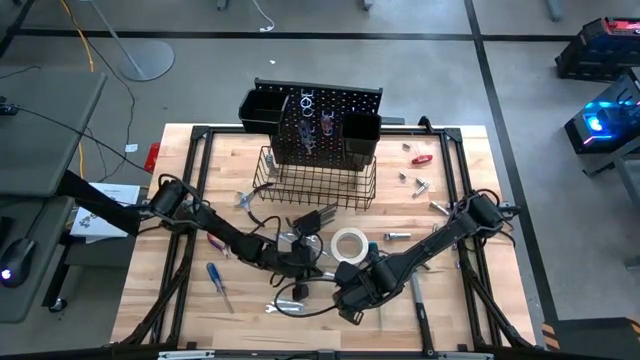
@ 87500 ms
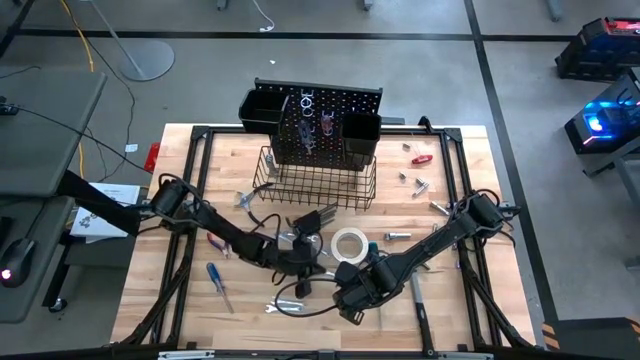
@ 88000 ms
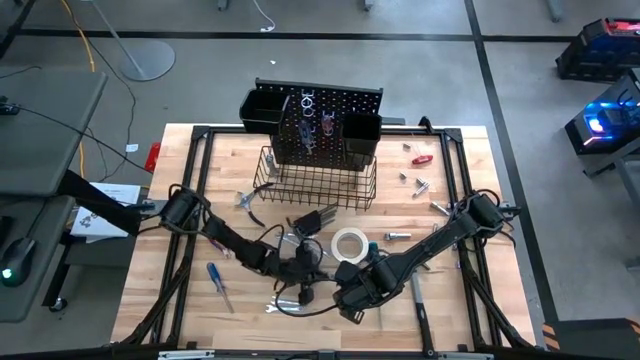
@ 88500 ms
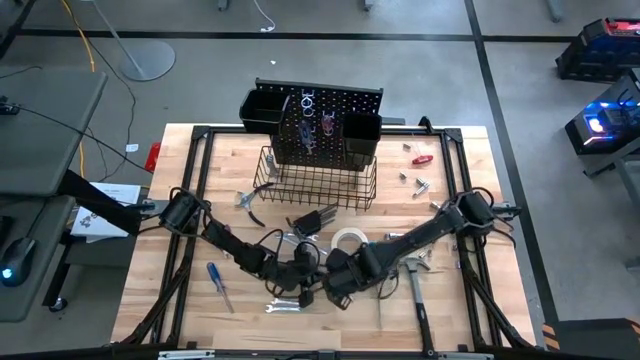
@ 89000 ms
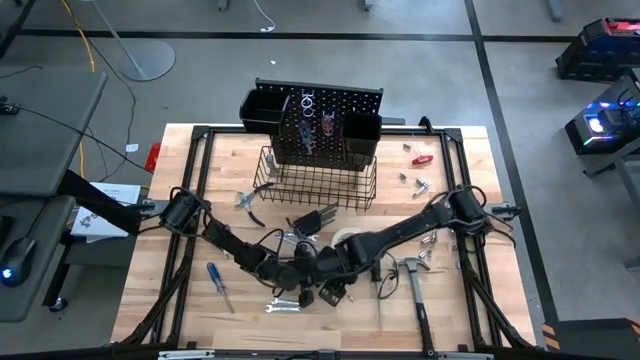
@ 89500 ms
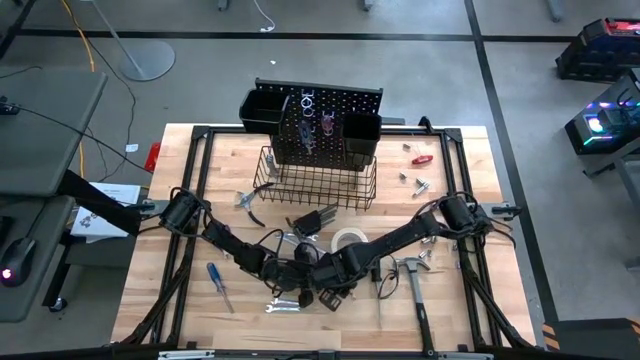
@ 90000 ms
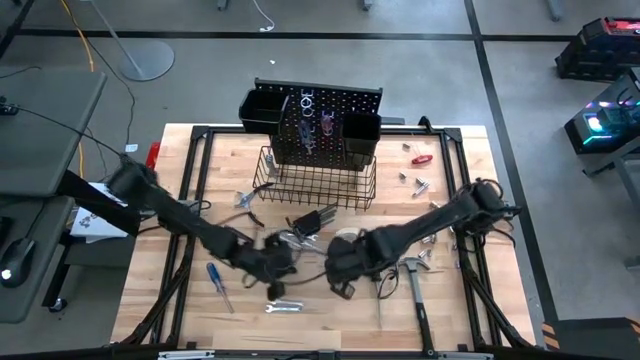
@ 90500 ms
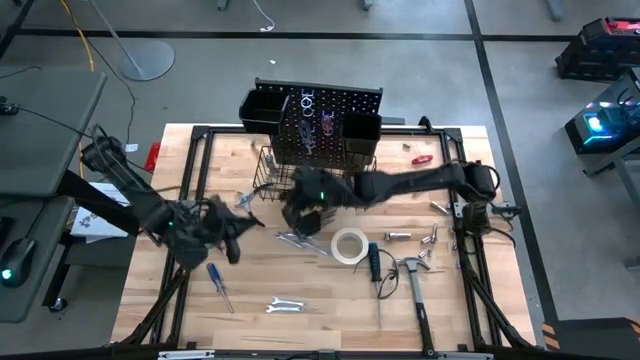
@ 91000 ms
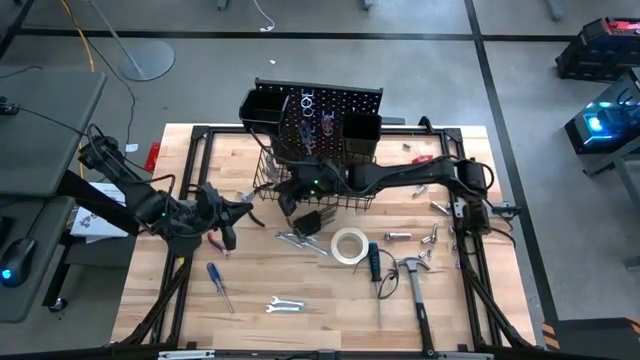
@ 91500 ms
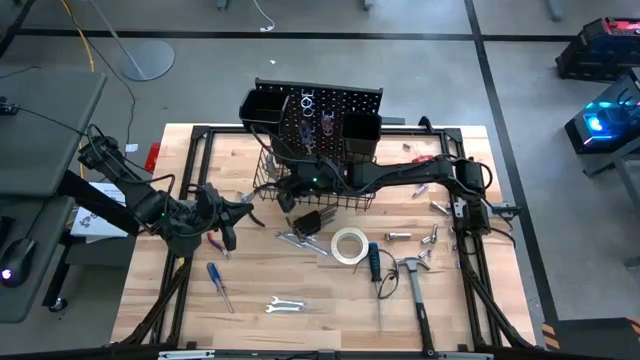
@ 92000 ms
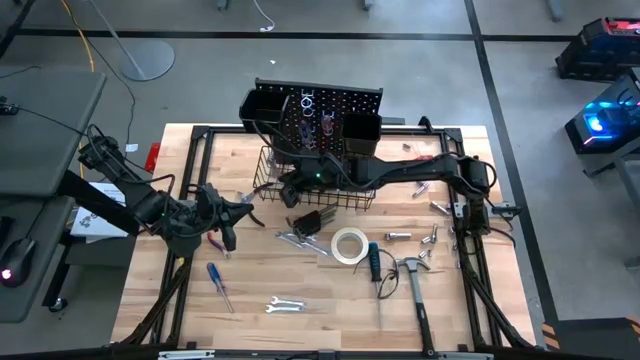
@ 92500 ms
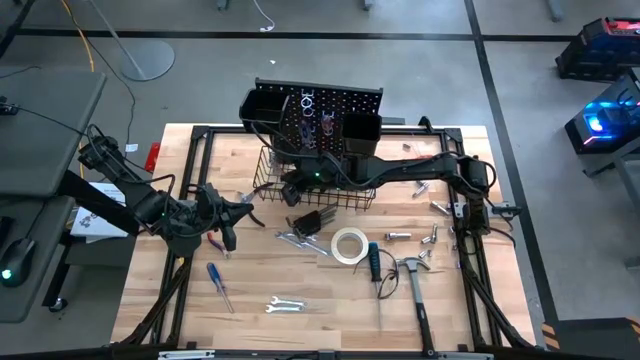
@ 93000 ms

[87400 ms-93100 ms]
Task: Hang tools onto peg board
Hang the wrench on the peg board

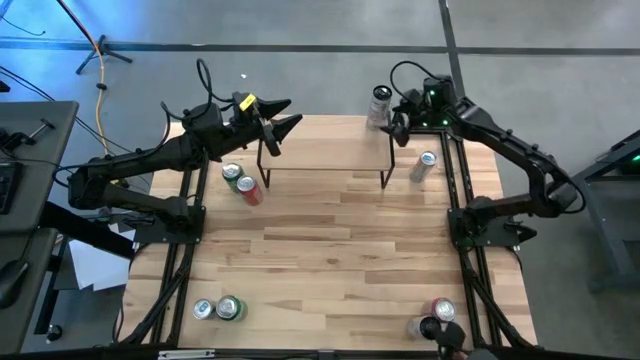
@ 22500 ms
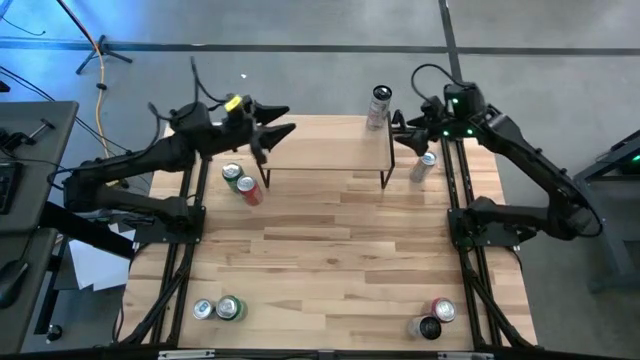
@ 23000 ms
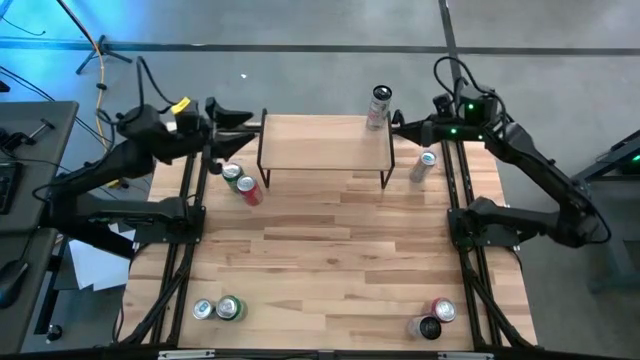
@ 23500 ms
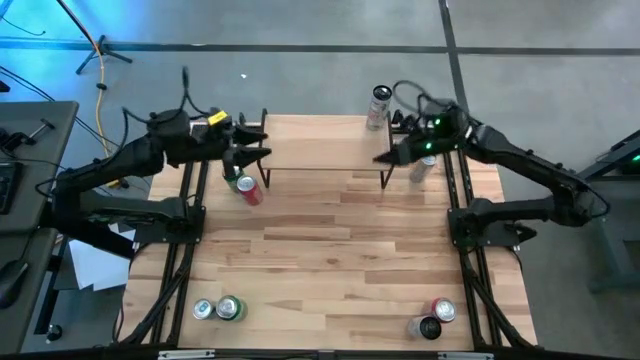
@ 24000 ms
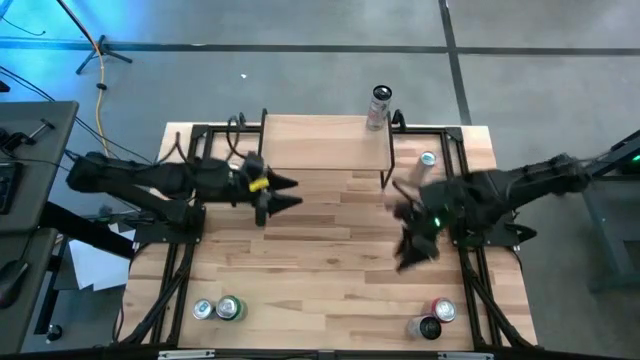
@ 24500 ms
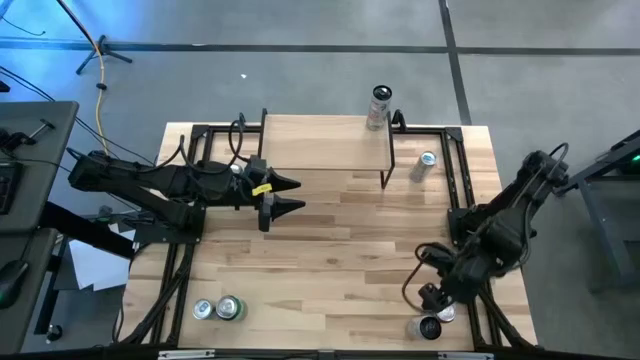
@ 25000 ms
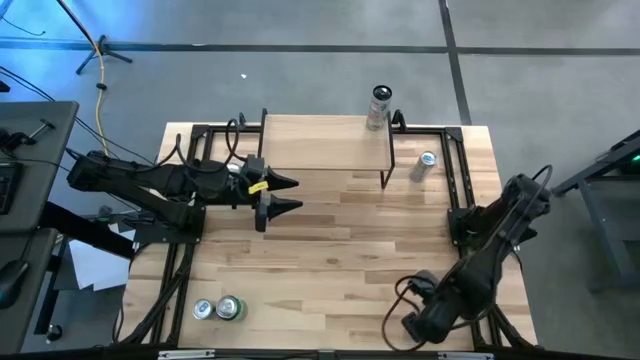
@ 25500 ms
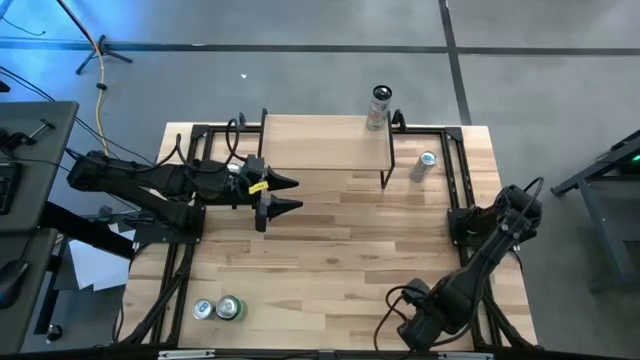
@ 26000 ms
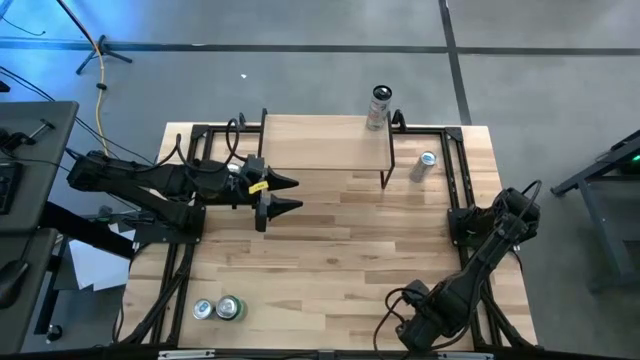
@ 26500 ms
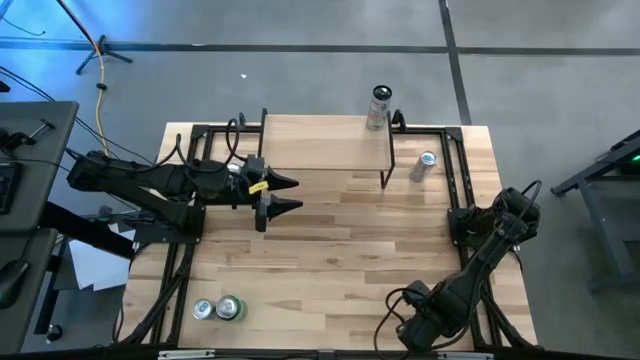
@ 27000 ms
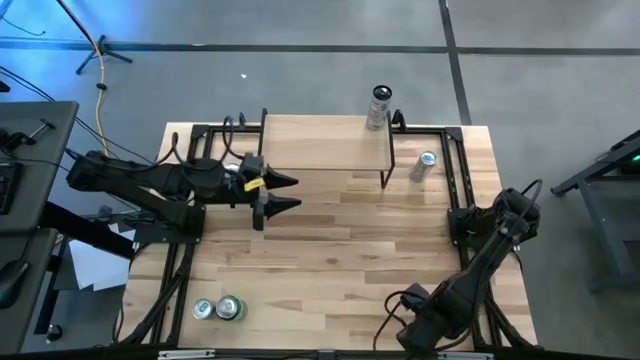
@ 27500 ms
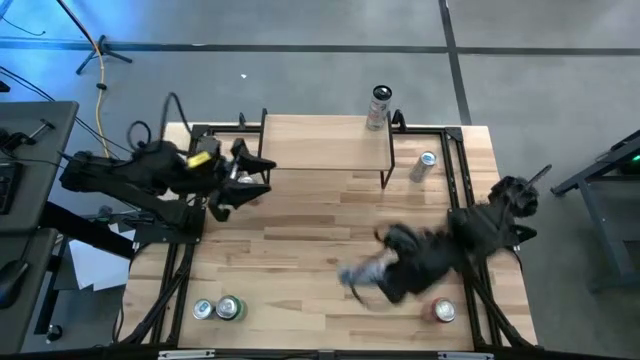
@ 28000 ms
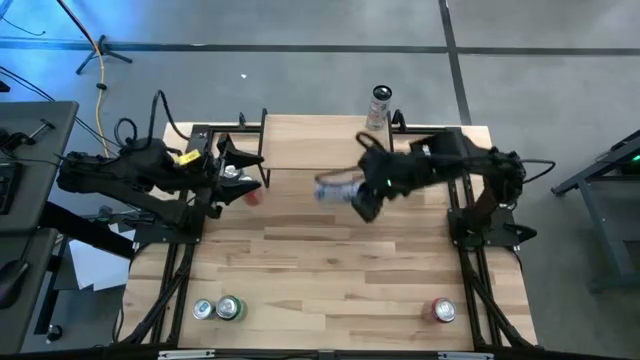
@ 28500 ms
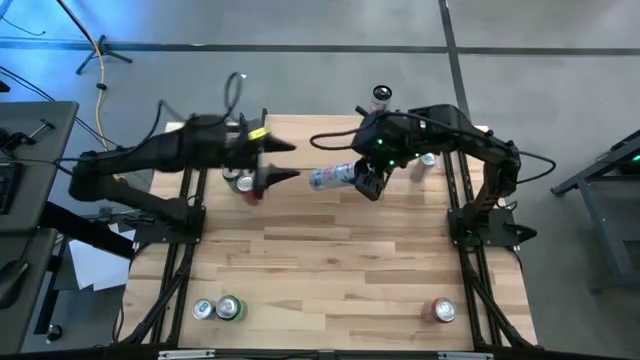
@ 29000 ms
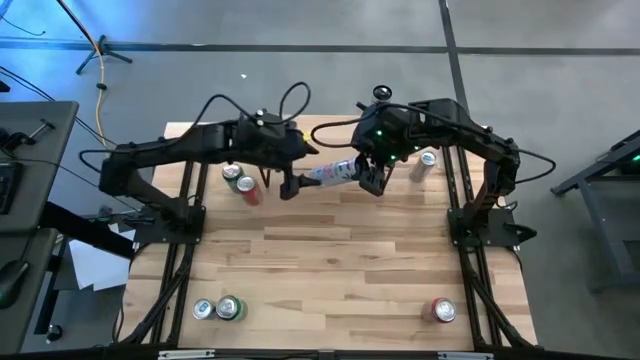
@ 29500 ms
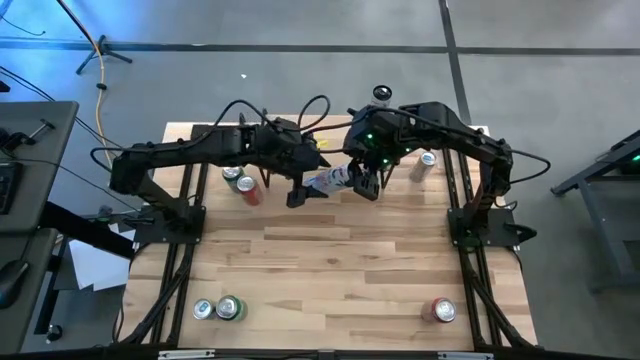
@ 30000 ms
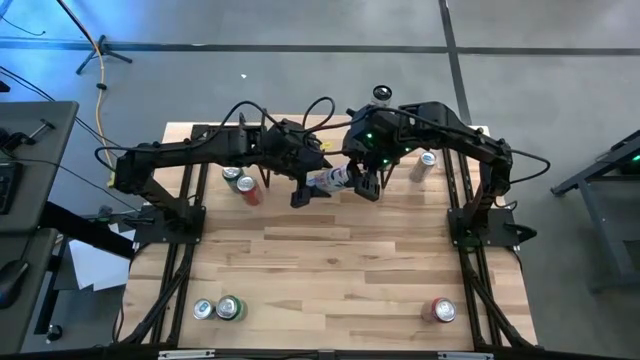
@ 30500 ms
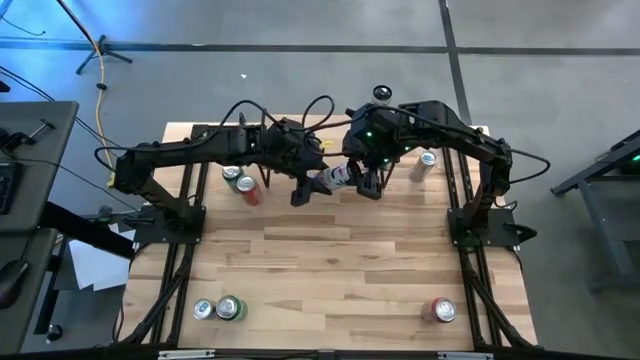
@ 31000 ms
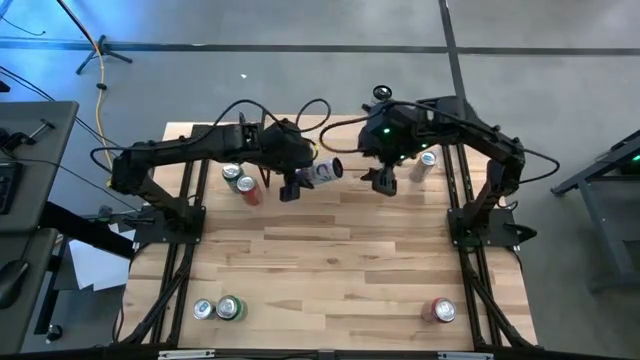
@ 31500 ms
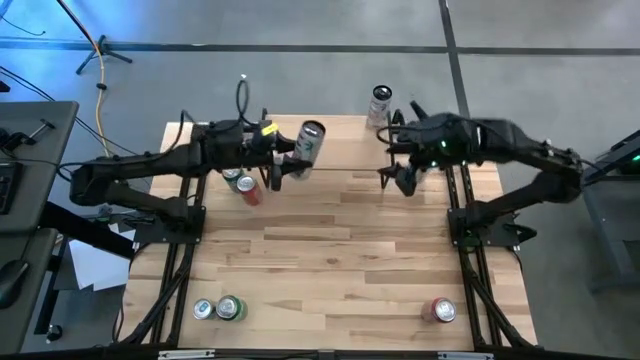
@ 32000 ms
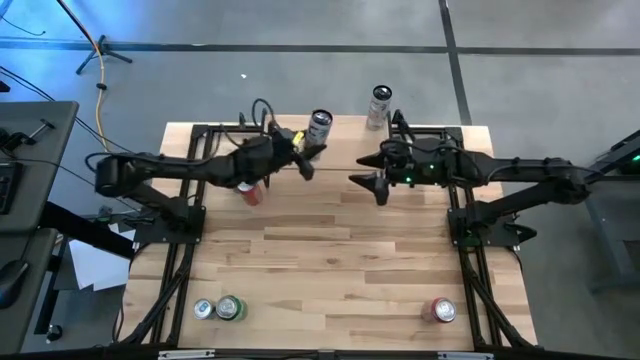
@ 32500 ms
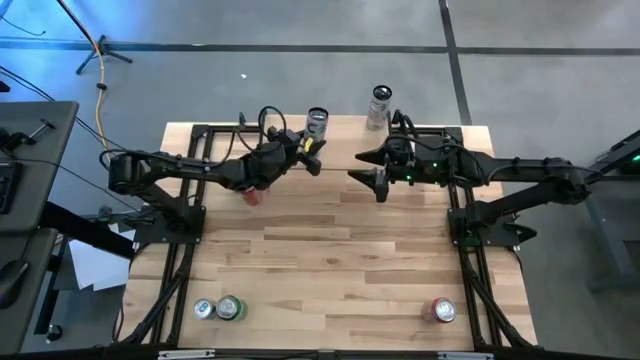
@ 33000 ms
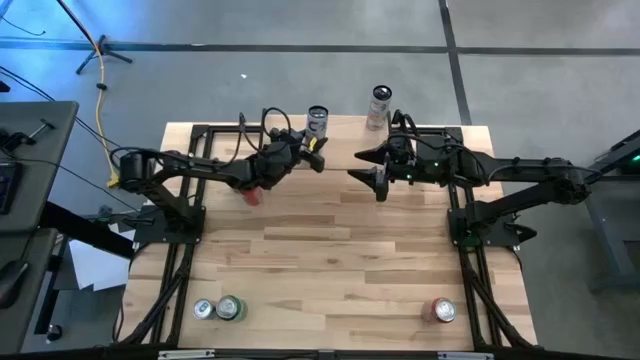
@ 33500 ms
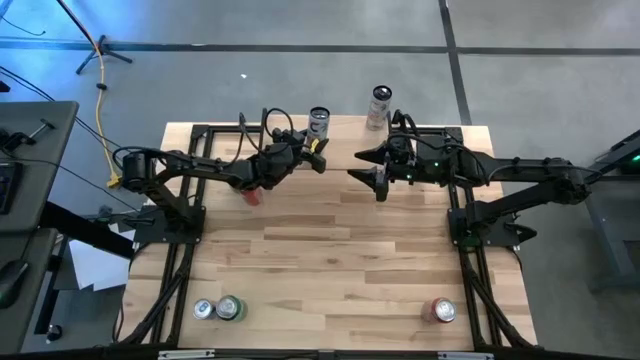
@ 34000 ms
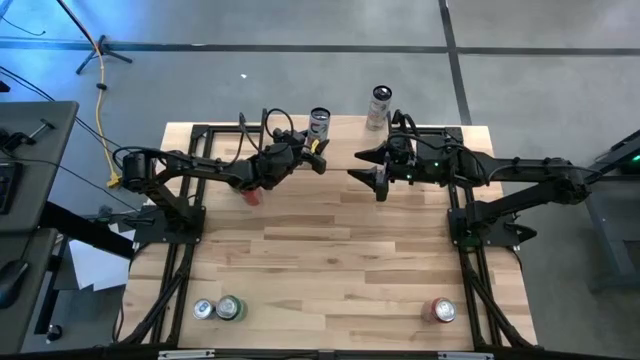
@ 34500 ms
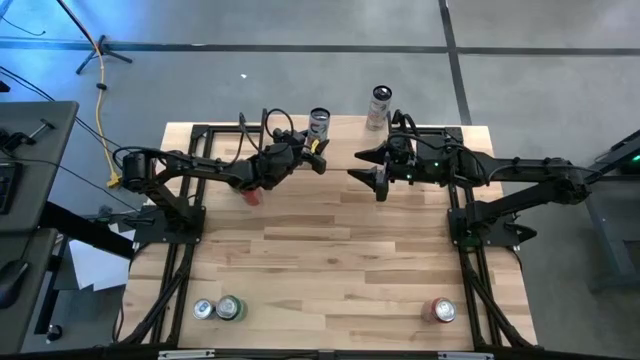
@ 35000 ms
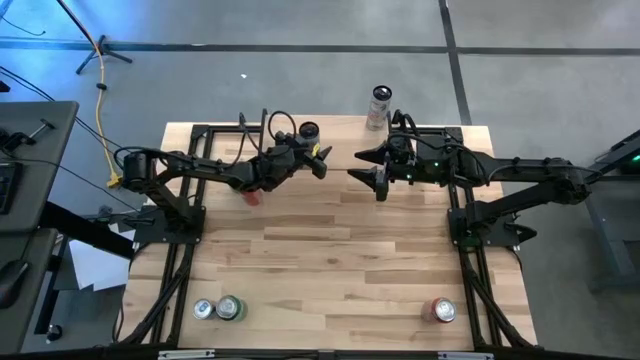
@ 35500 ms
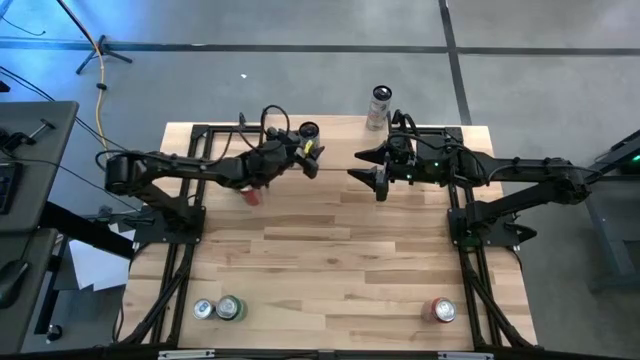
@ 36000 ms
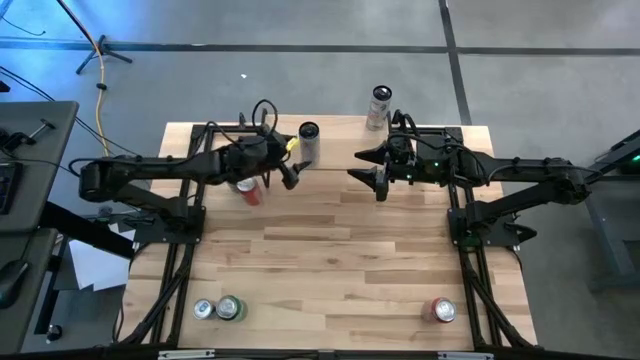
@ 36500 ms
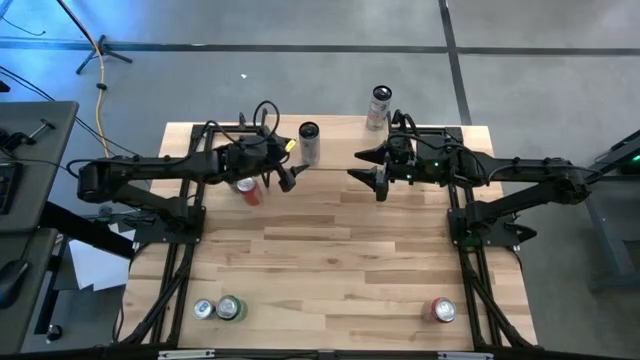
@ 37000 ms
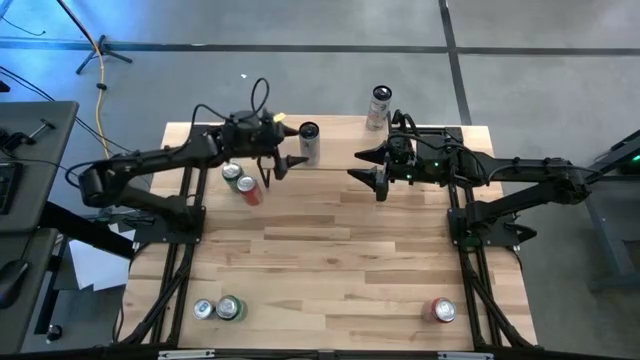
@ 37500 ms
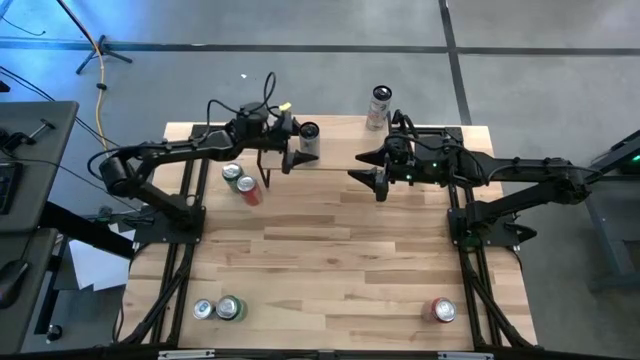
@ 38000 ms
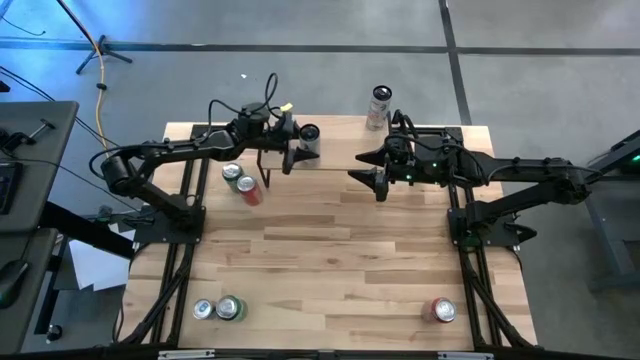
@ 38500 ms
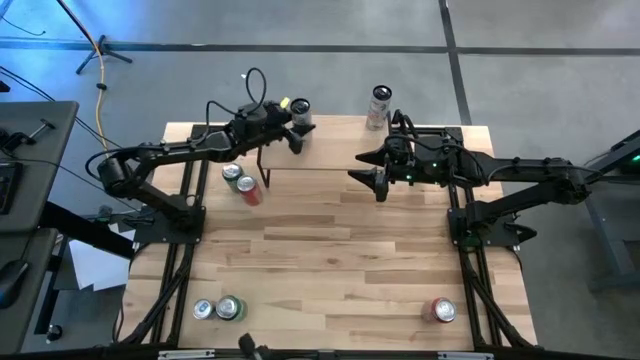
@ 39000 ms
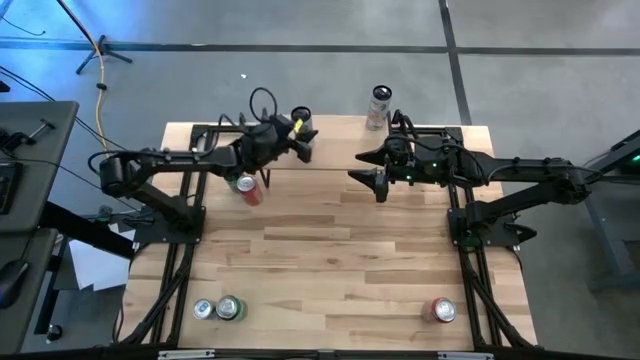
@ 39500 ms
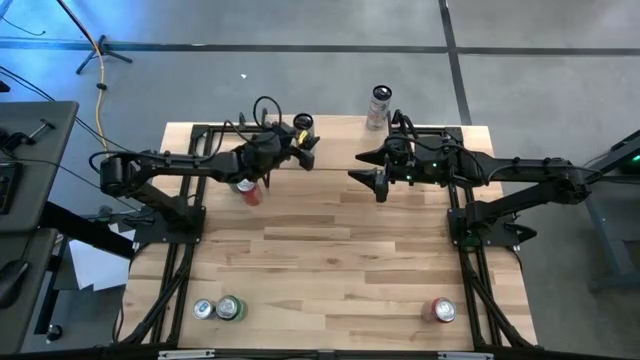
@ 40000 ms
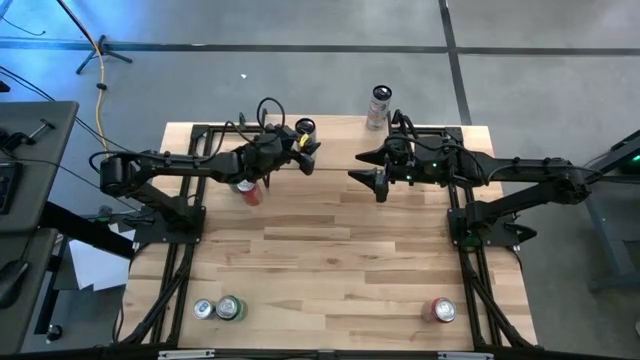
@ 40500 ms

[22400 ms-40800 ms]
Task: Place canned beverage on shelf
Put the white pink soda can on the shelf aligned with the other white pink soda can
